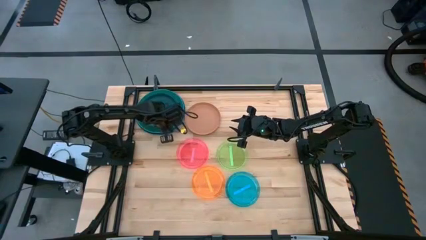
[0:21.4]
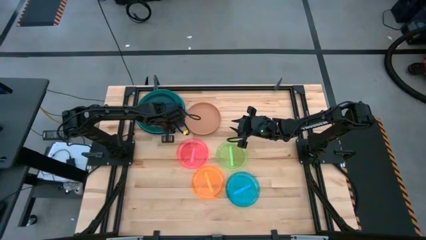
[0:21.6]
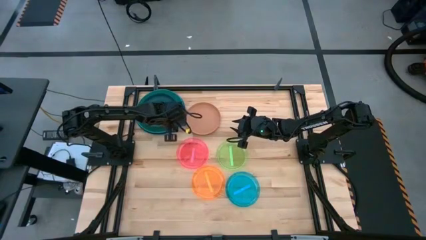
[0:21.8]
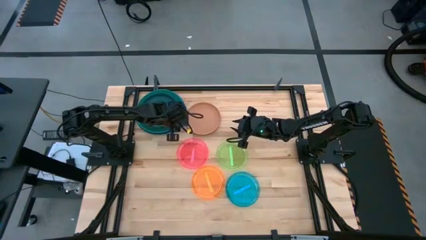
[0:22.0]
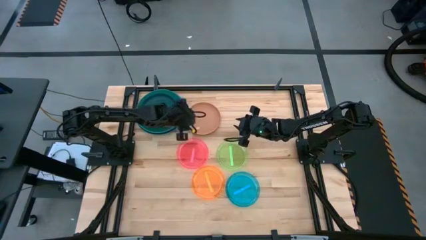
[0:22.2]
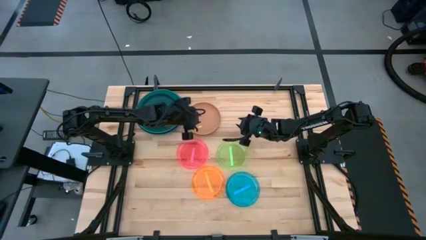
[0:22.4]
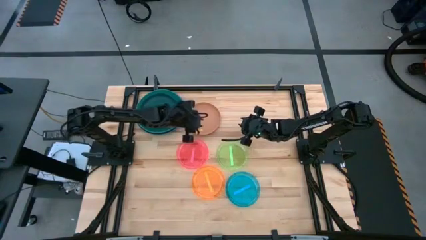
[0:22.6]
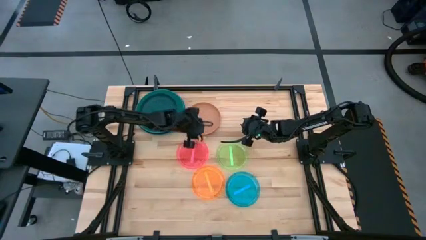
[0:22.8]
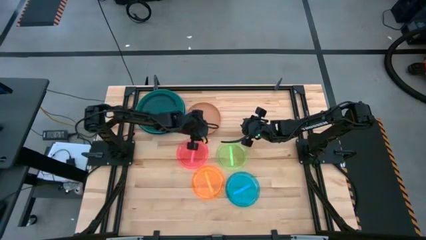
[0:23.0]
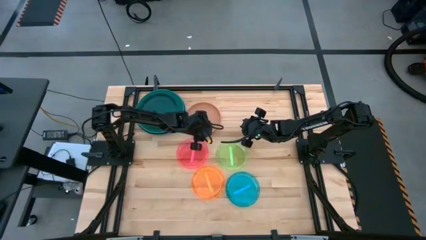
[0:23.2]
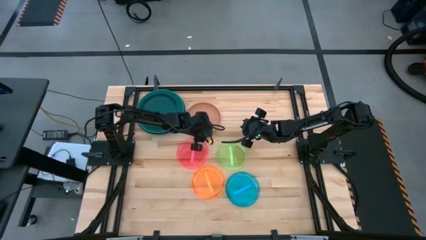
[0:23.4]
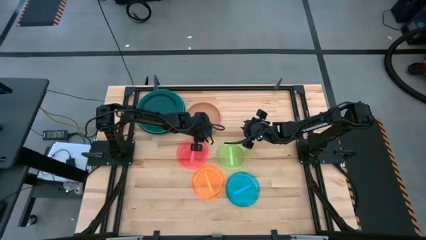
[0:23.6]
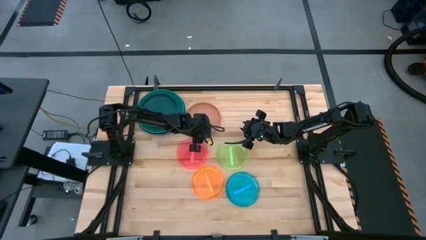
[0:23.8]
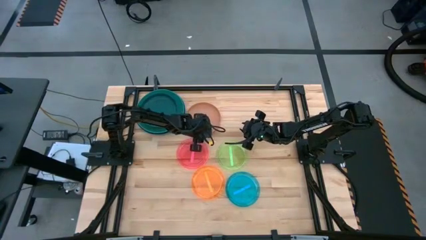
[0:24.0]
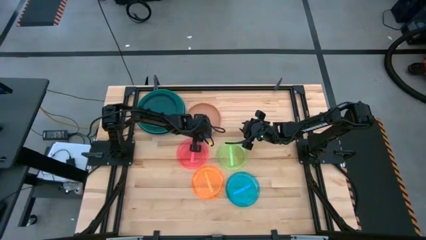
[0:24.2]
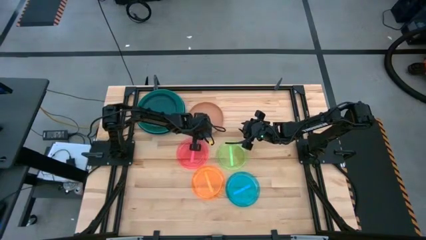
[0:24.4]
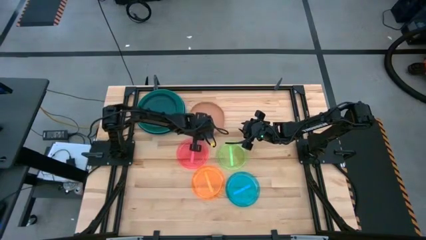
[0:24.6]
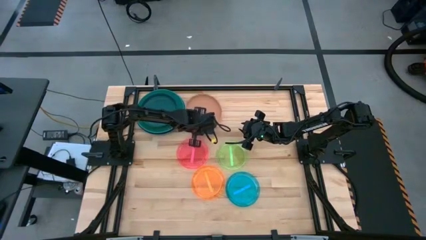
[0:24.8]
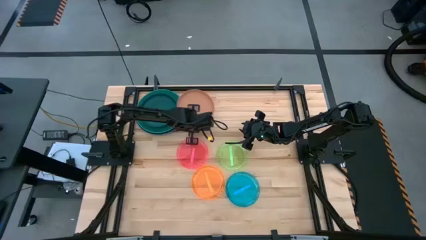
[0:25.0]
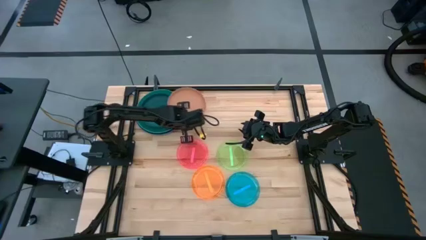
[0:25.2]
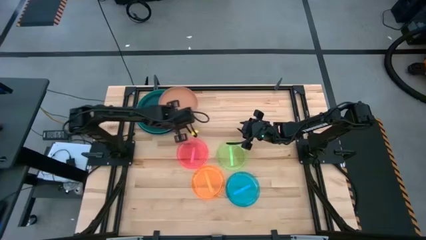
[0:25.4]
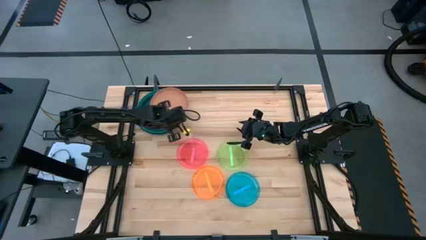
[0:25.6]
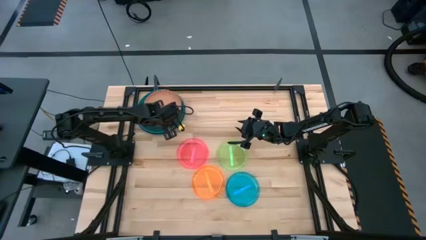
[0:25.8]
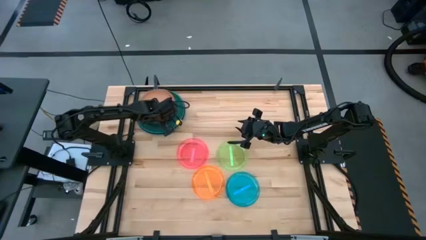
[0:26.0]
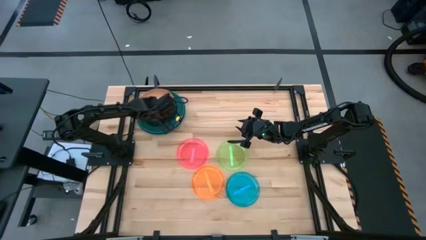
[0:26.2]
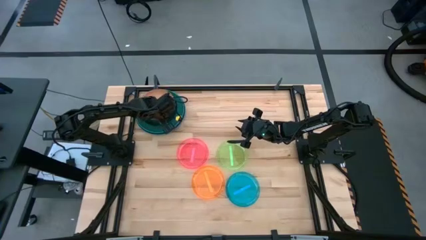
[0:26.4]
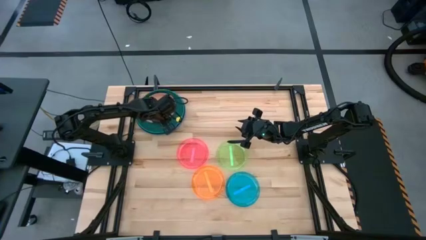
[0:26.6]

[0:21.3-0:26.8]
Task: Stack plastic plates
Stack the small brown plate on the small dark blue plate

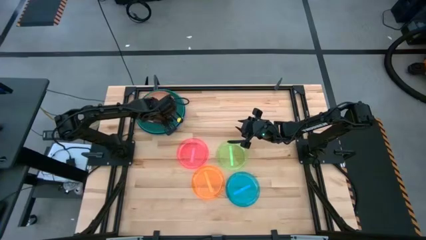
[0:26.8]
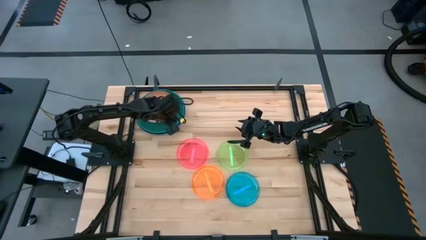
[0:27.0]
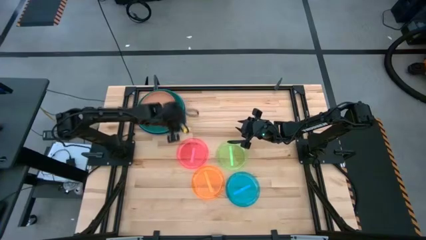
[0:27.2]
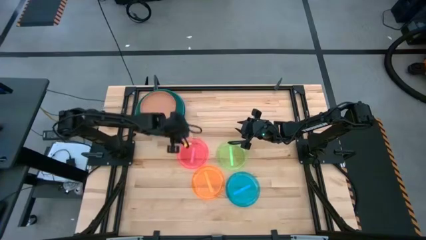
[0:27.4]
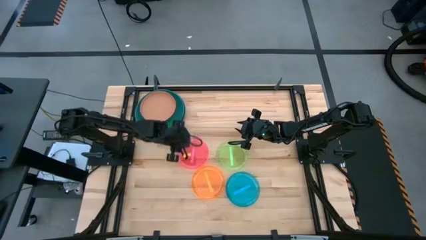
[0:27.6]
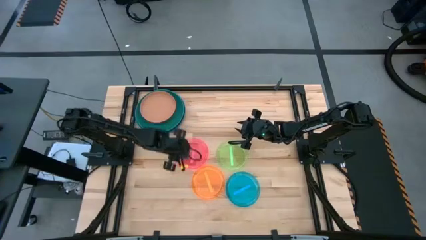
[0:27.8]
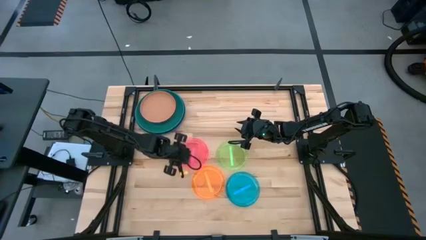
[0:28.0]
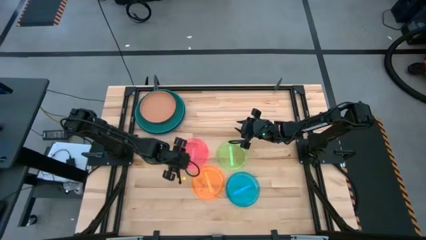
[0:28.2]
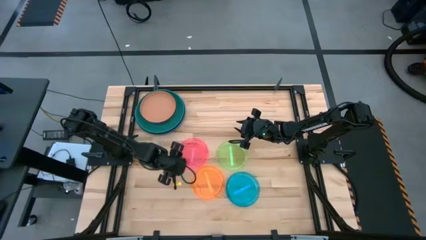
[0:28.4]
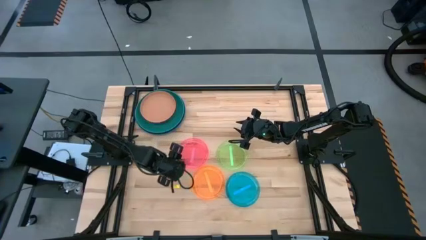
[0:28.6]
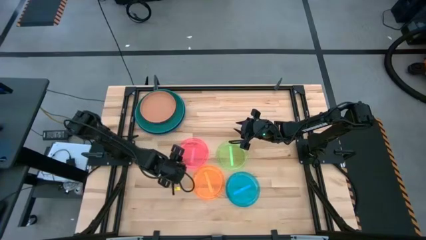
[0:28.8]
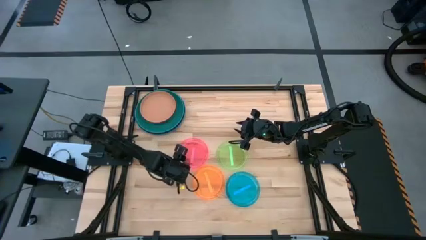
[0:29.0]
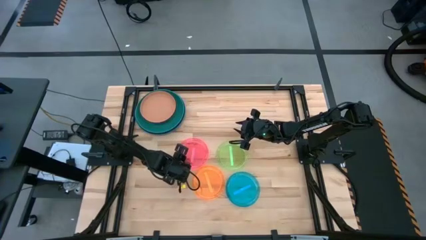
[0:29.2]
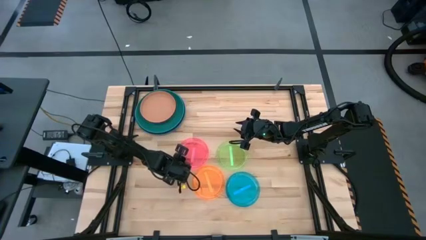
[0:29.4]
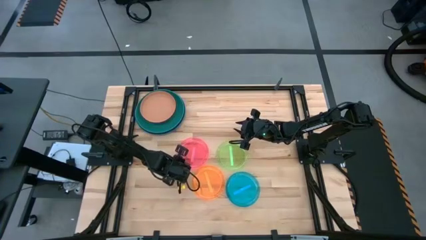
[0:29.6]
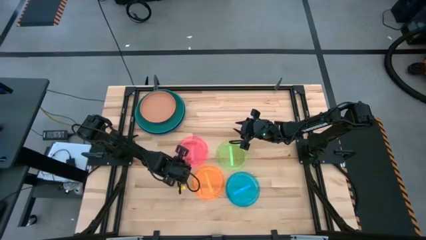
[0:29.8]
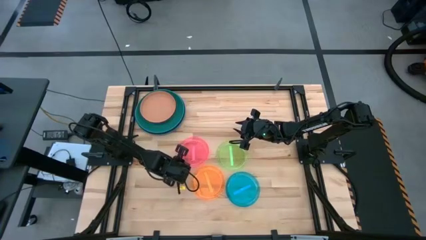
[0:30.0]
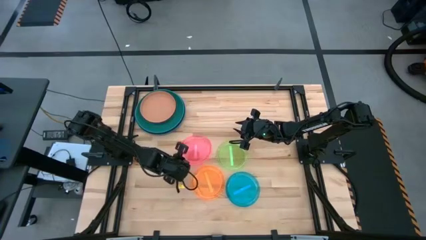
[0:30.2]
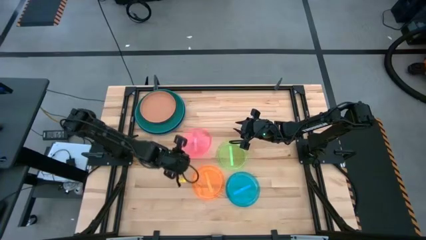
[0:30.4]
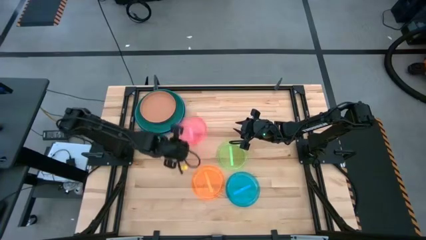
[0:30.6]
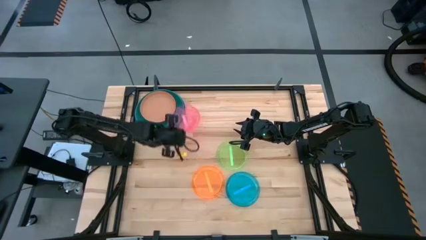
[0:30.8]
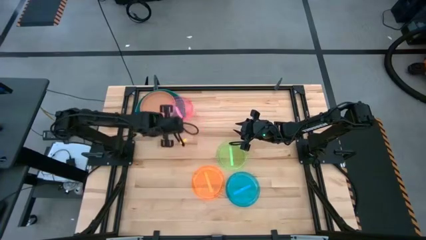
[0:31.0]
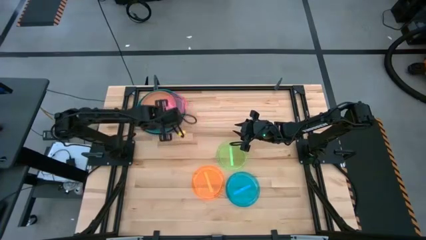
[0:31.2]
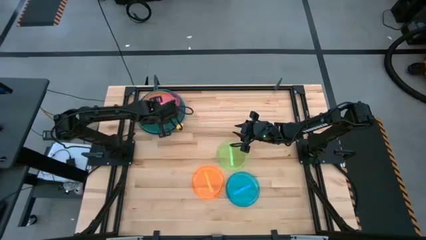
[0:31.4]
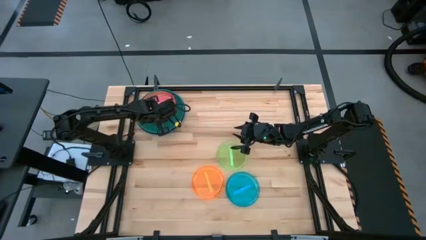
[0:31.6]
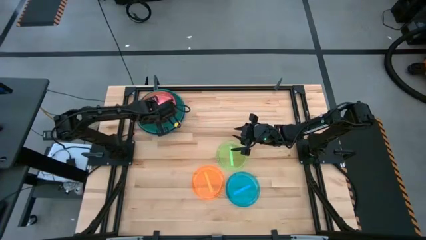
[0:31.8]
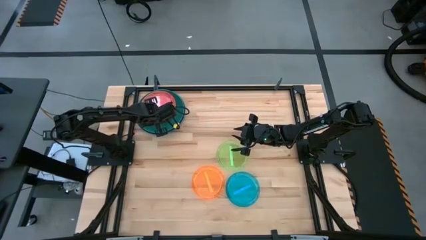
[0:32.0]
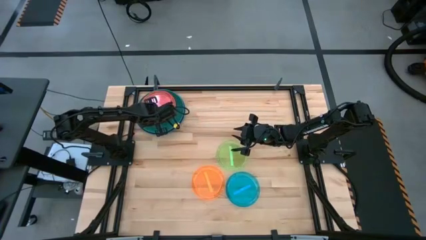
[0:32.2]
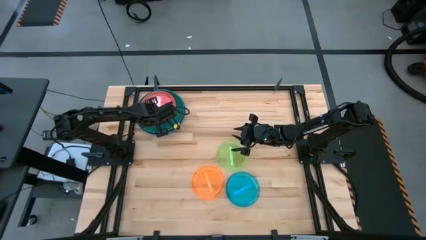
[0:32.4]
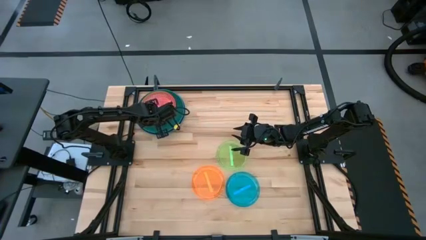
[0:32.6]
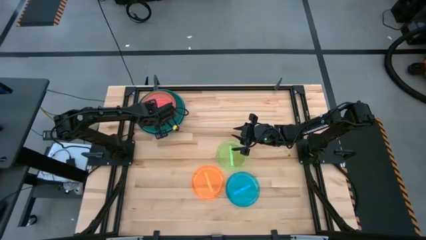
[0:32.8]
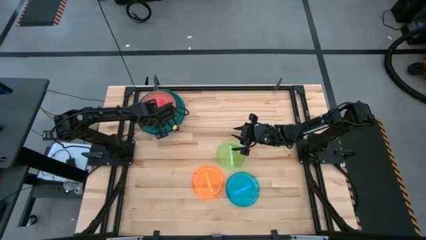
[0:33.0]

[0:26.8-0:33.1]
Stack the small pink plate on the small brown plate

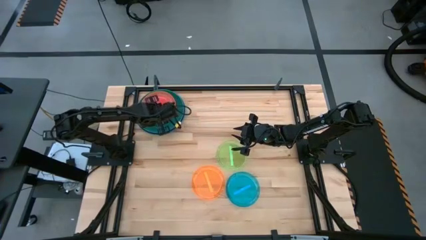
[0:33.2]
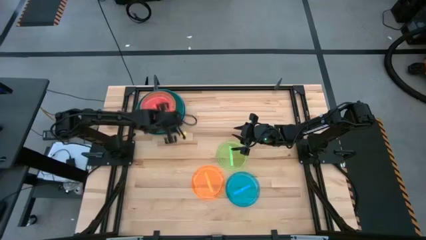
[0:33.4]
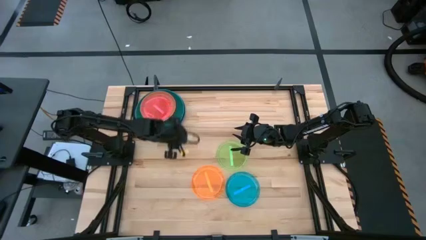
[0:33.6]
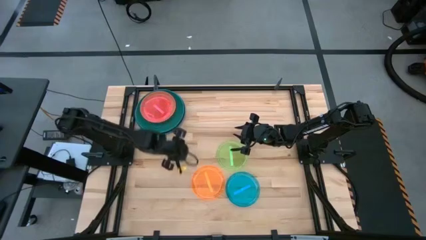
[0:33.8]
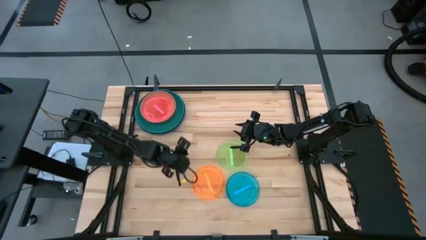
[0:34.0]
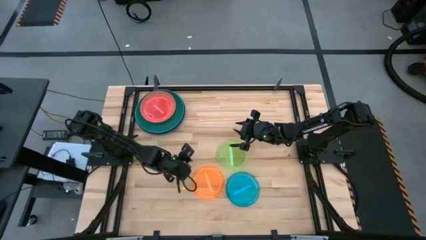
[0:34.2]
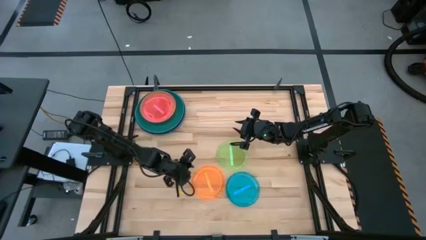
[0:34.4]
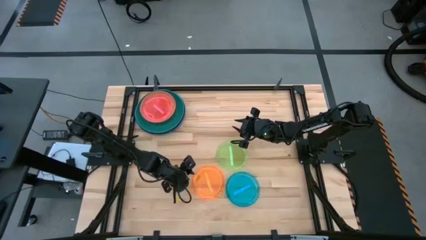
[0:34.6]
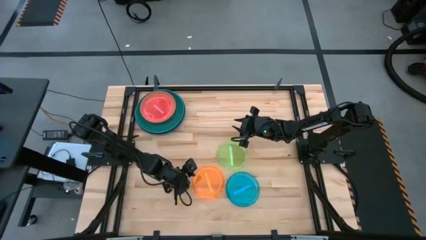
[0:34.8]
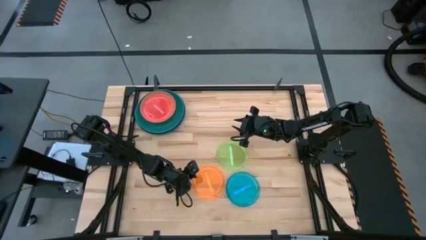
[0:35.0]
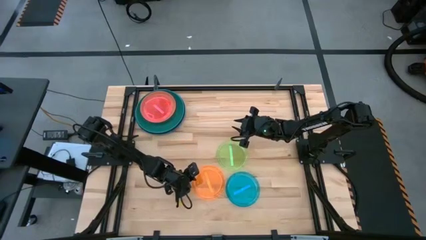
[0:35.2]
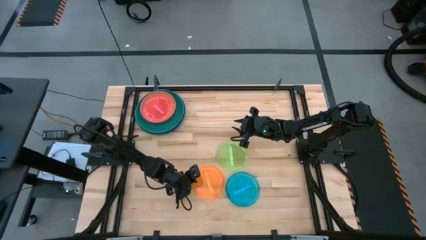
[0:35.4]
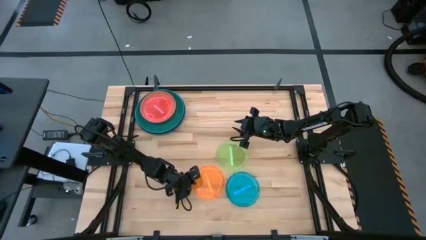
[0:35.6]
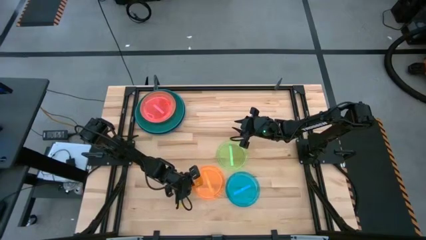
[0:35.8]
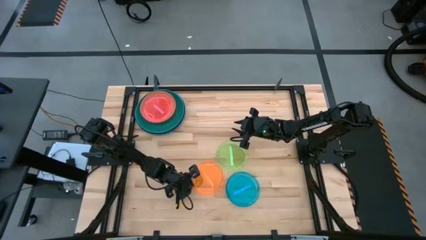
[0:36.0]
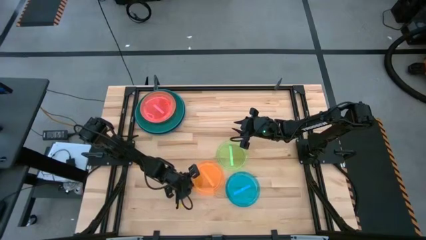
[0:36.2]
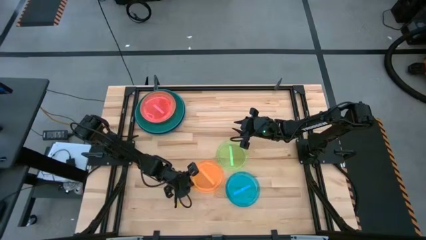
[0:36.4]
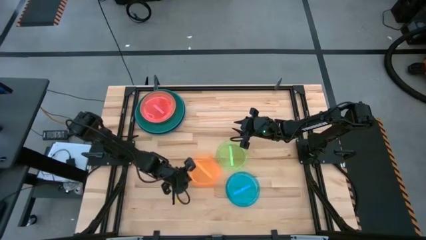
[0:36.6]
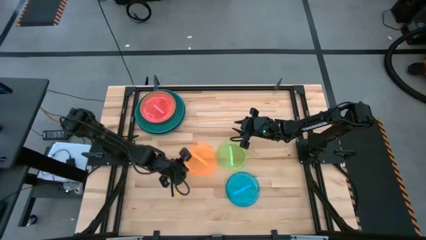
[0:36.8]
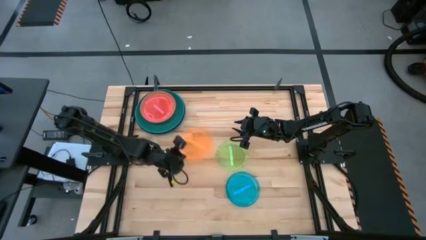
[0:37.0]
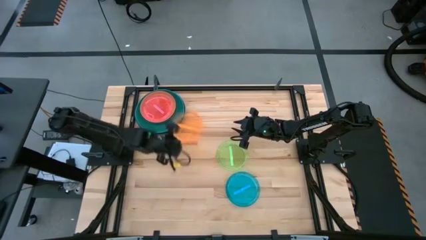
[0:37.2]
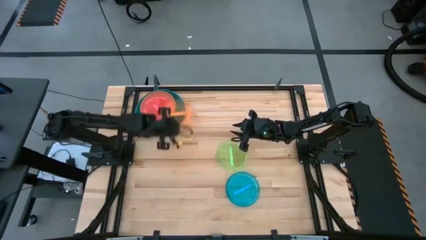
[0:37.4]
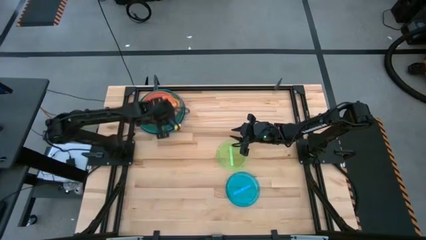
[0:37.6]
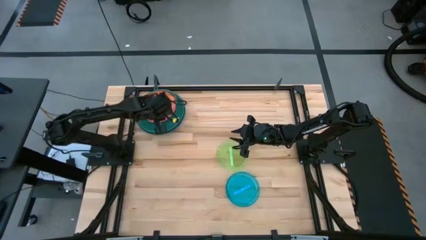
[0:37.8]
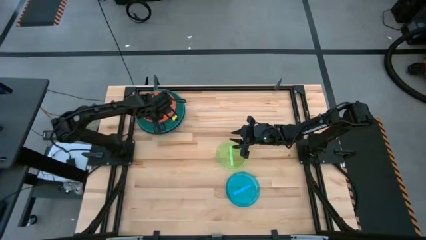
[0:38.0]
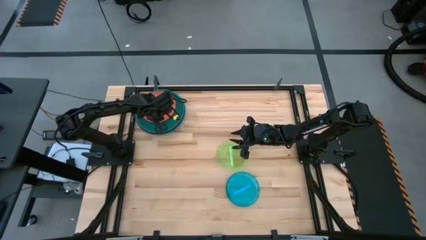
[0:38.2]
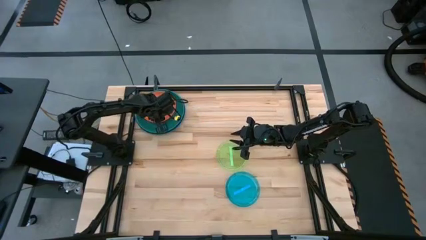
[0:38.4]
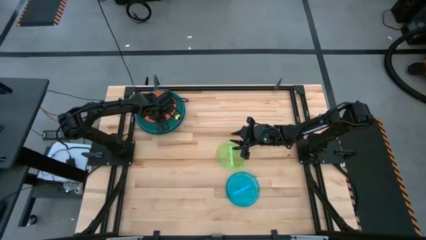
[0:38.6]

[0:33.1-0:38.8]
Stack the small orange plate on the small pink plate
